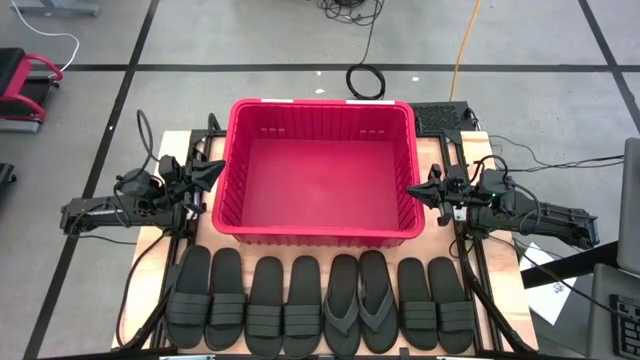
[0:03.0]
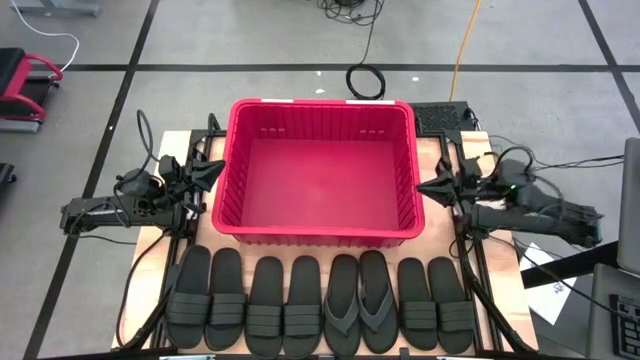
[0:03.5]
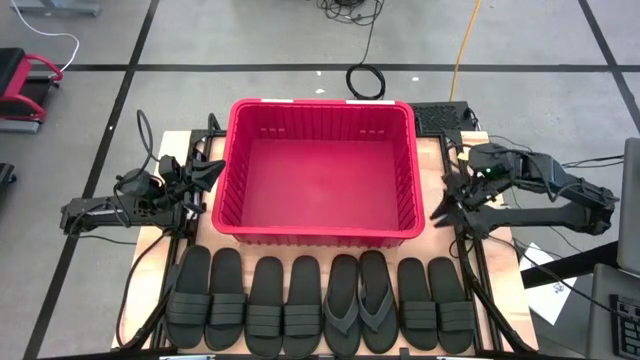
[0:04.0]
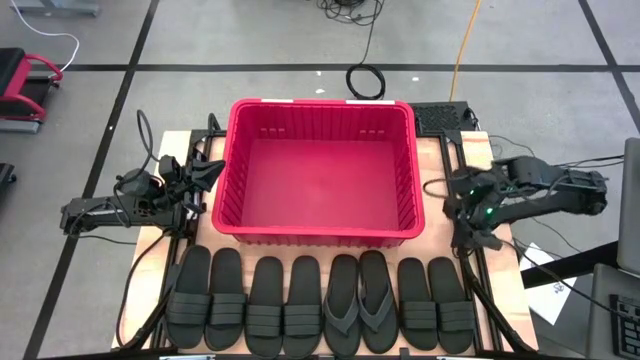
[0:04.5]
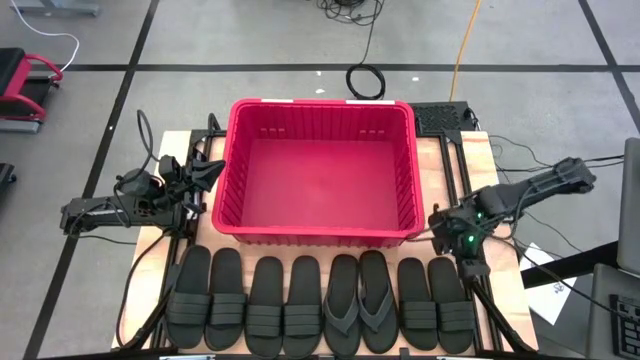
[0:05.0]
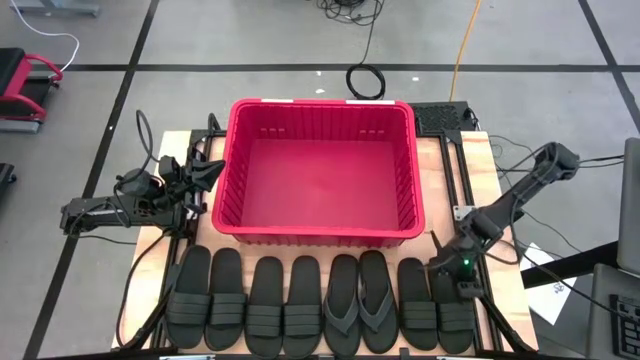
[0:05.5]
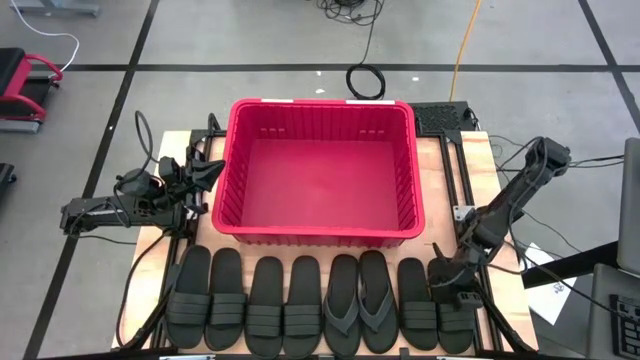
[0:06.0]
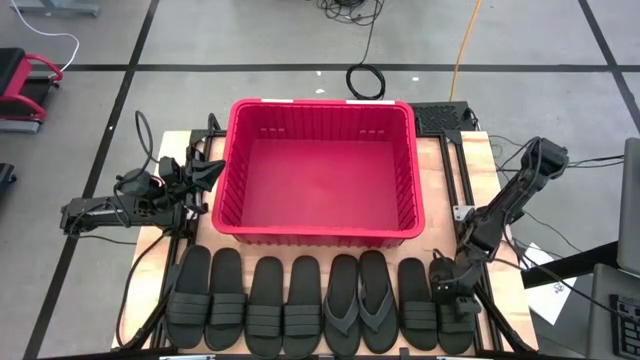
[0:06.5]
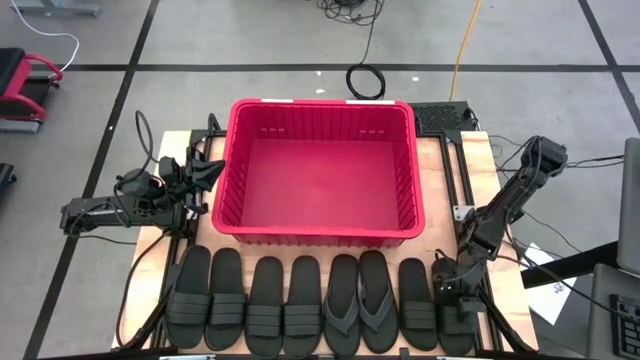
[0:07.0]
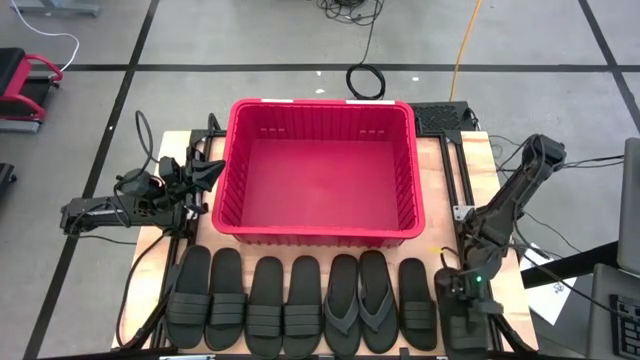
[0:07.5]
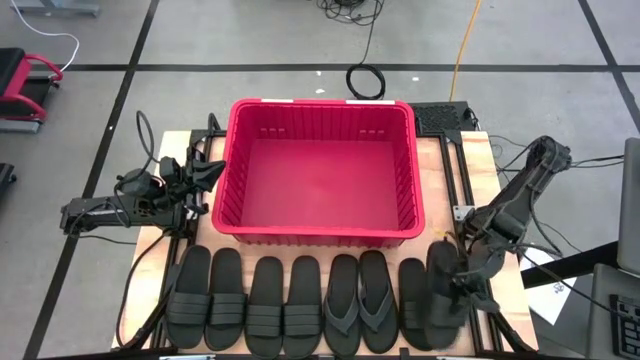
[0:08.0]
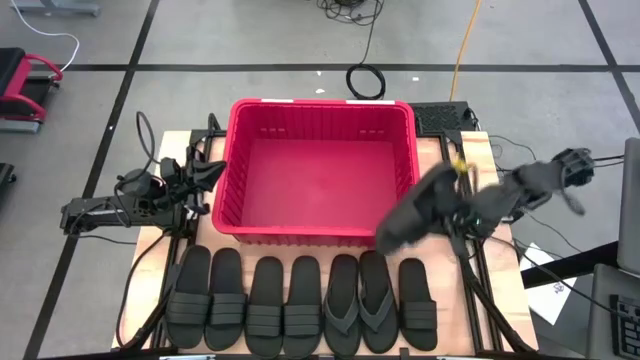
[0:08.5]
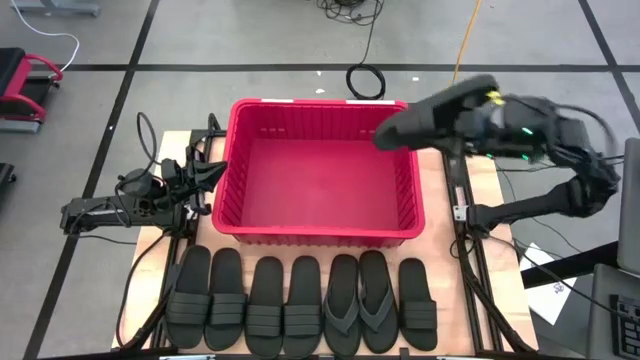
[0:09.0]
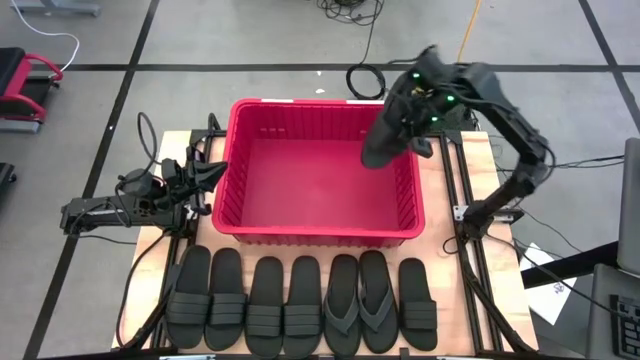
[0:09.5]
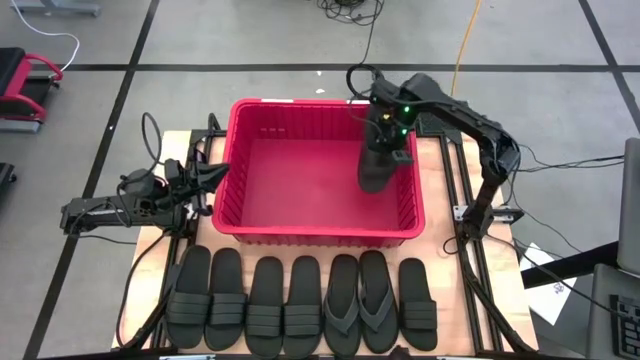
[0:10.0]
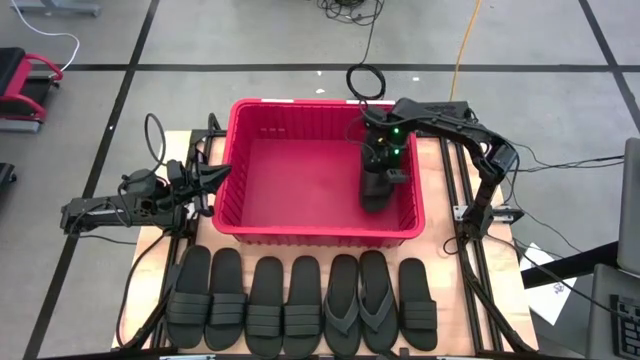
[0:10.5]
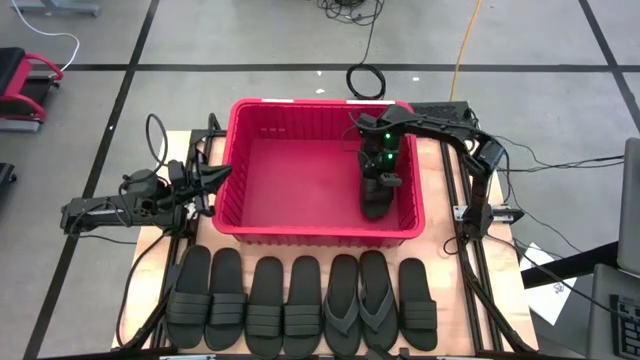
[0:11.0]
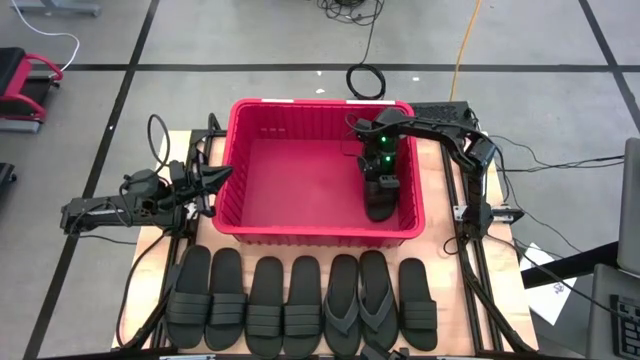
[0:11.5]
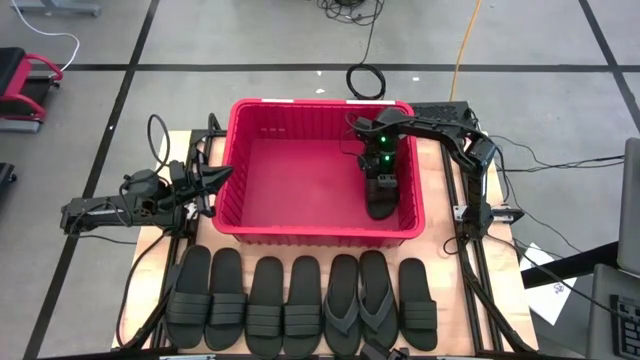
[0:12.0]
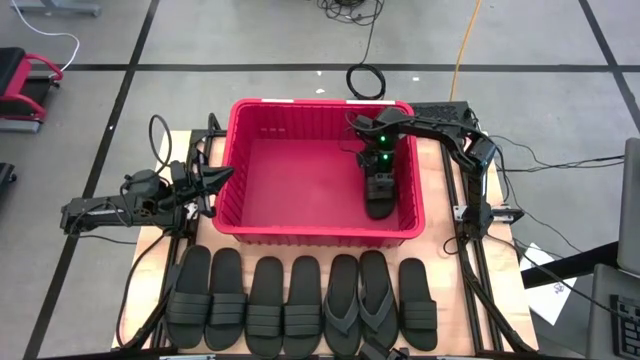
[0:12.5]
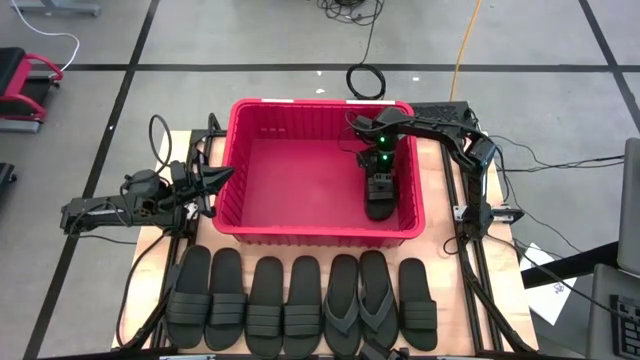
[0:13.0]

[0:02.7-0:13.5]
Task: Pick and place slides into bin
Put the slide into the bin

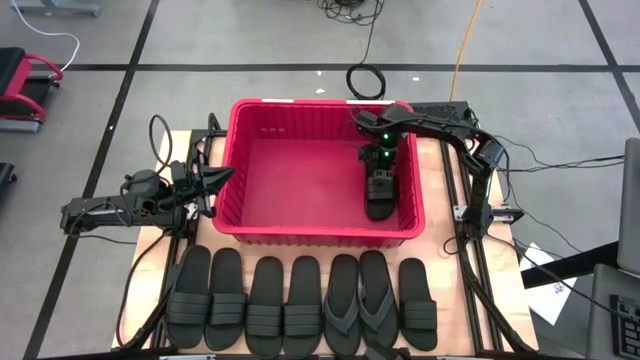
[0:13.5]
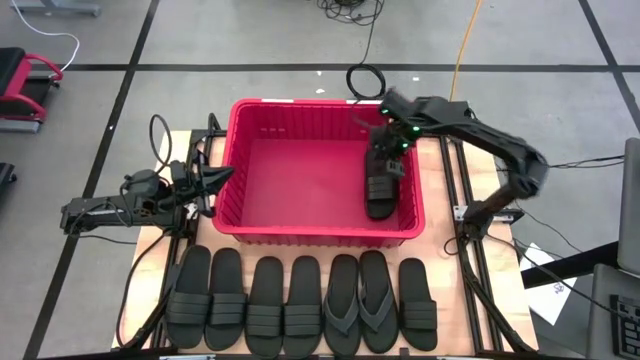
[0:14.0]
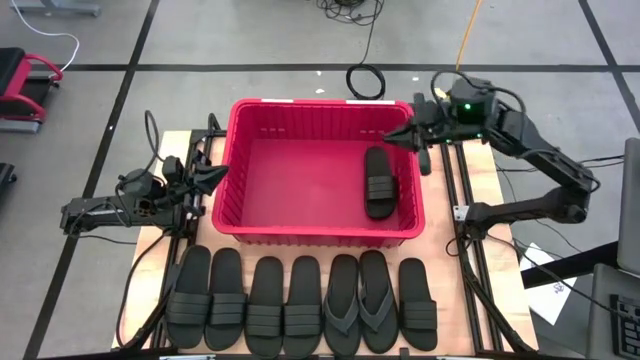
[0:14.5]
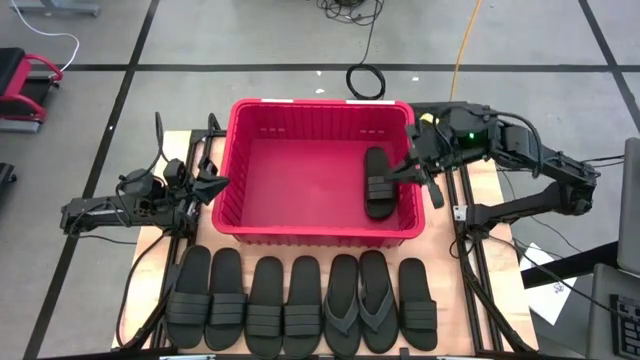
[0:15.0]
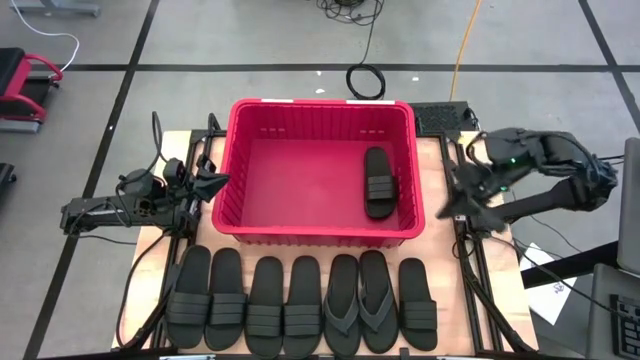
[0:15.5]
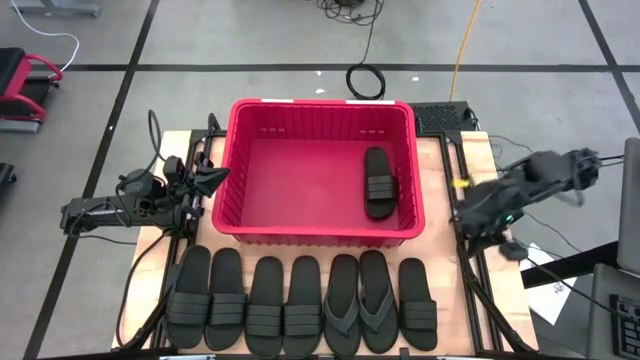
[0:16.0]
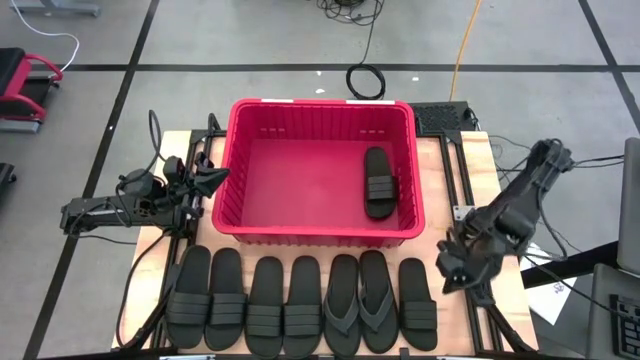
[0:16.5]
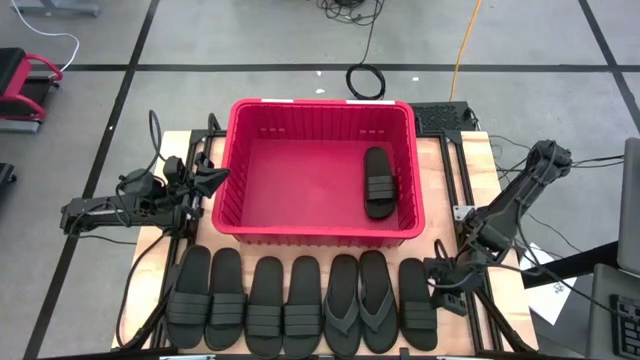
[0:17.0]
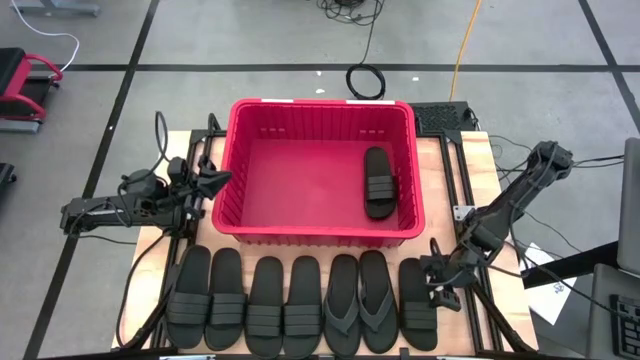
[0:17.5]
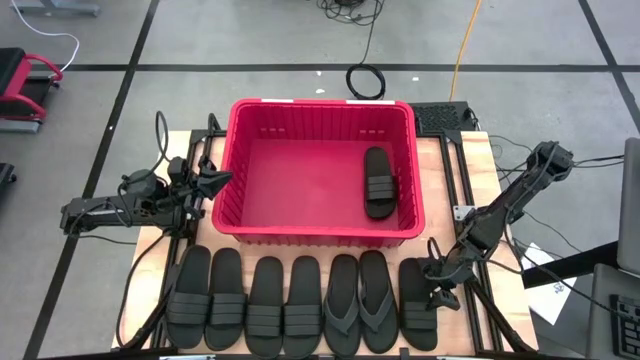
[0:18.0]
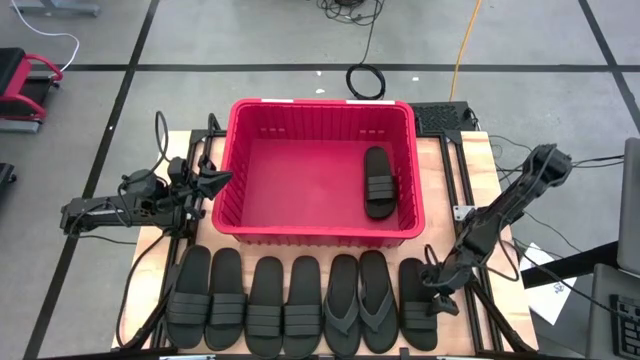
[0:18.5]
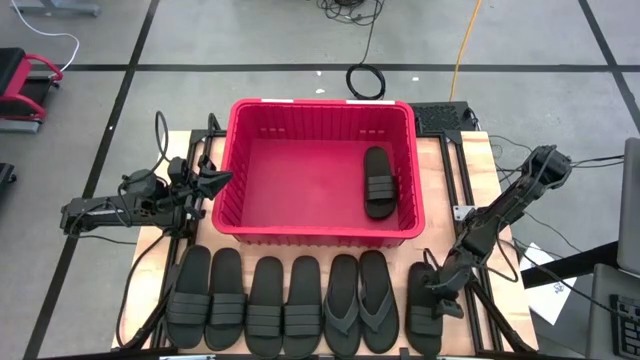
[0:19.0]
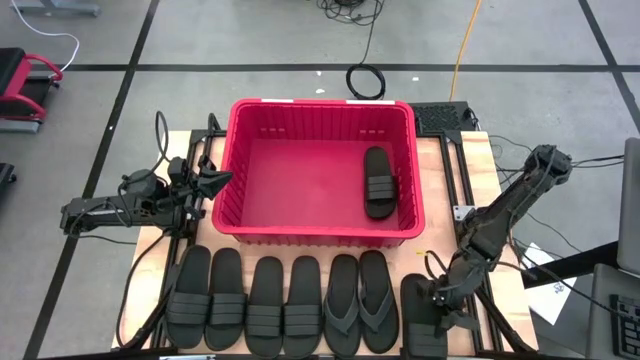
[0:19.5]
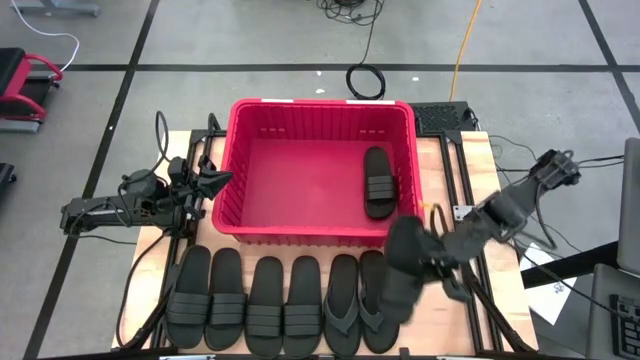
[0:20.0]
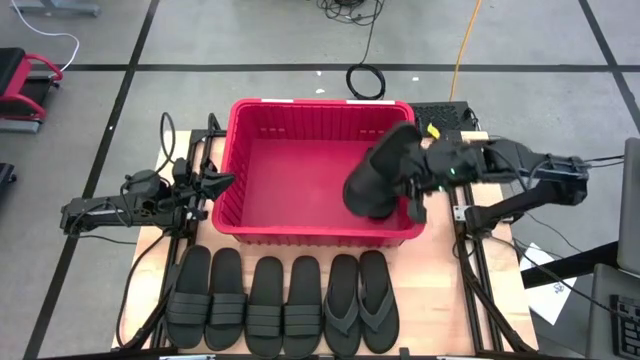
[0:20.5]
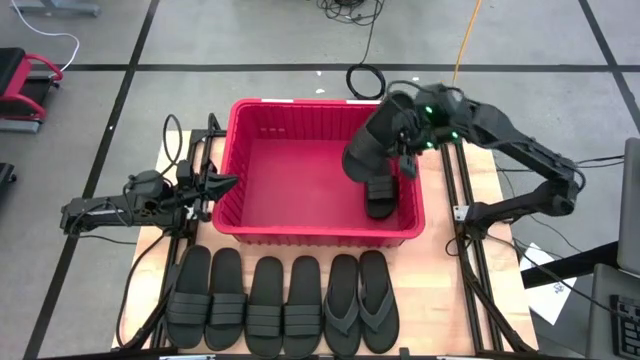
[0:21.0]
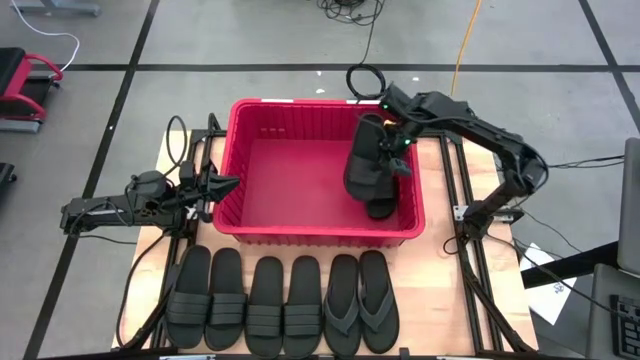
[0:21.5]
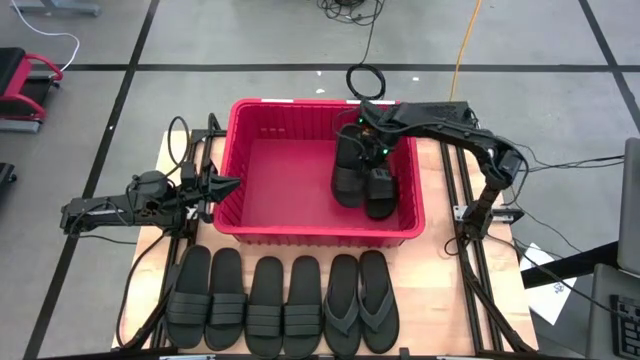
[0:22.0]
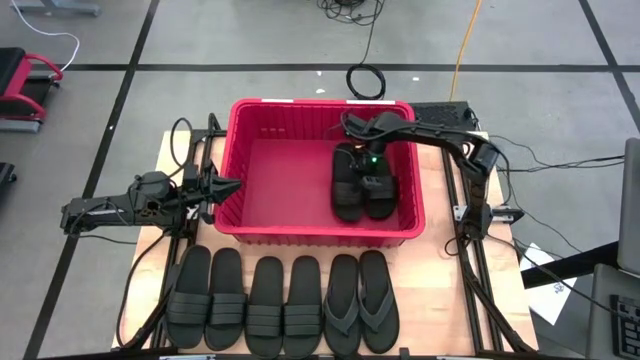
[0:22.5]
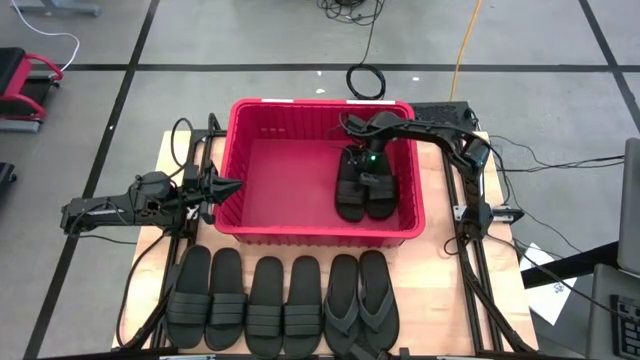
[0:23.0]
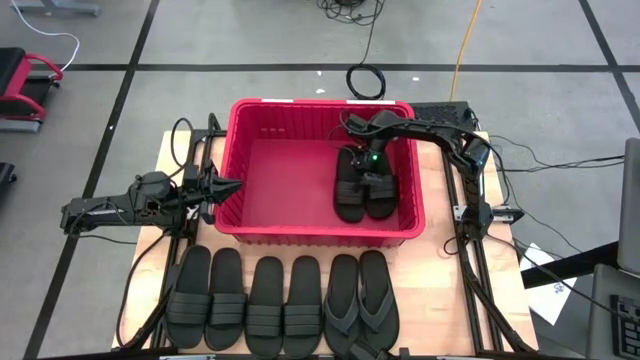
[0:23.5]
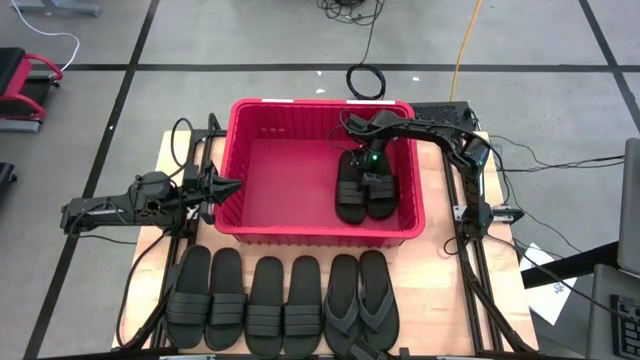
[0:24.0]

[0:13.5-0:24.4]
Put the slide into the bin
